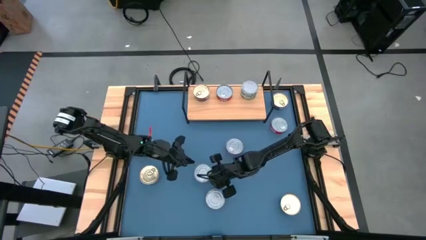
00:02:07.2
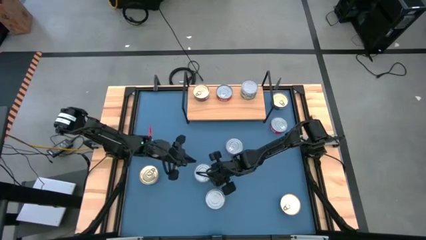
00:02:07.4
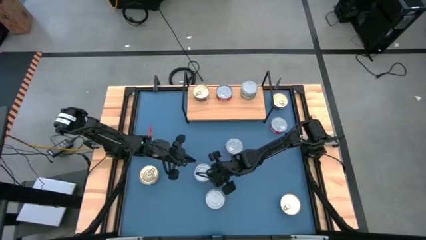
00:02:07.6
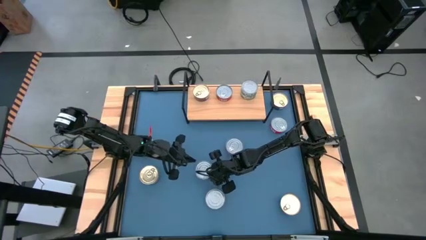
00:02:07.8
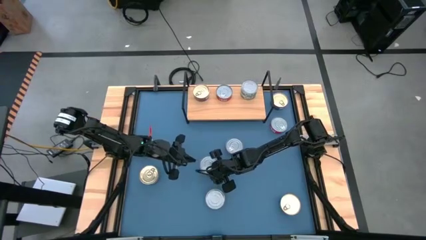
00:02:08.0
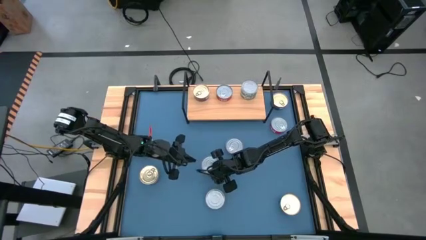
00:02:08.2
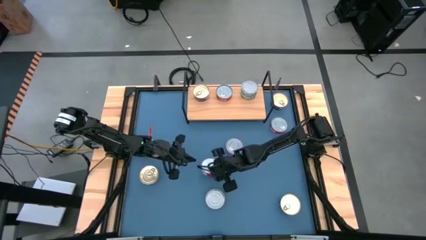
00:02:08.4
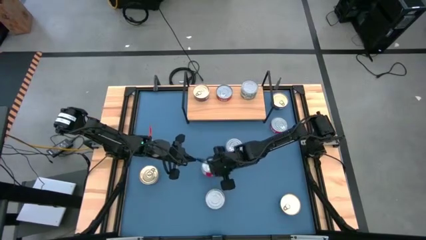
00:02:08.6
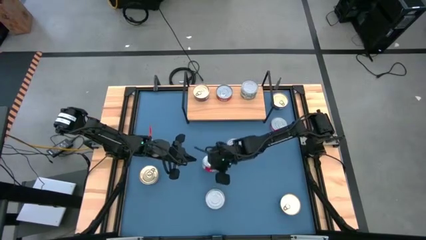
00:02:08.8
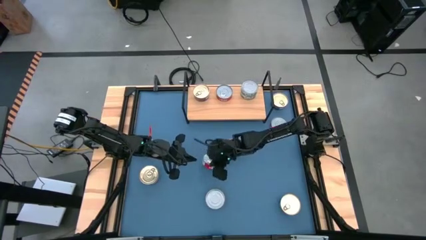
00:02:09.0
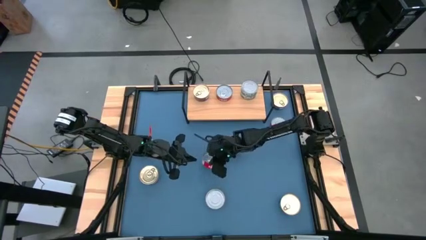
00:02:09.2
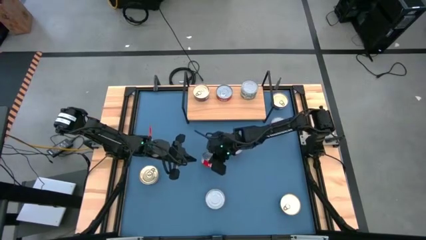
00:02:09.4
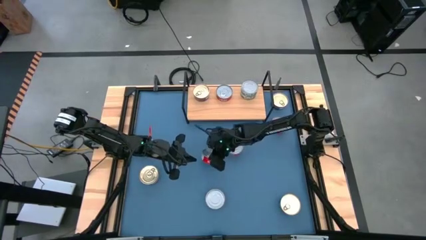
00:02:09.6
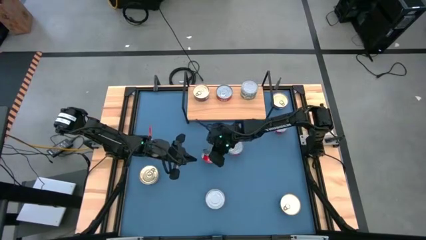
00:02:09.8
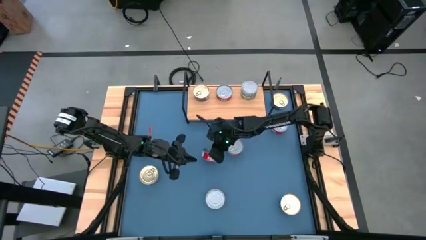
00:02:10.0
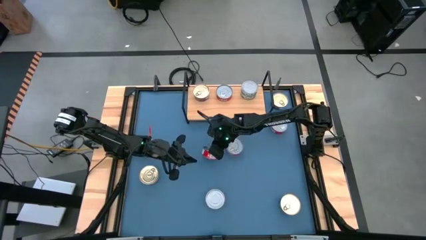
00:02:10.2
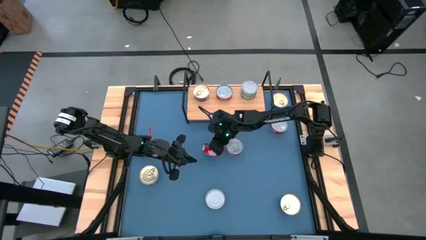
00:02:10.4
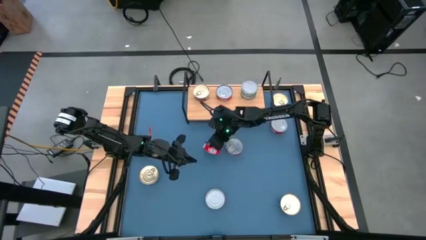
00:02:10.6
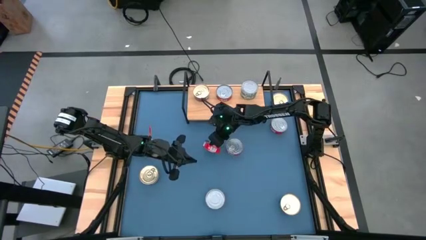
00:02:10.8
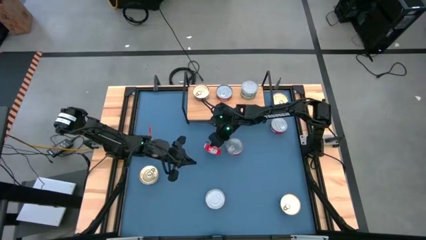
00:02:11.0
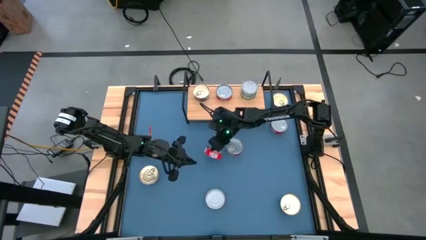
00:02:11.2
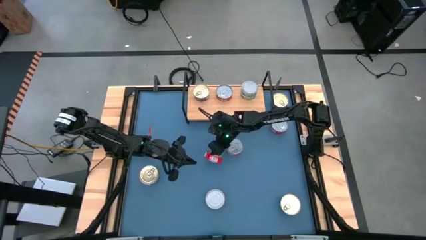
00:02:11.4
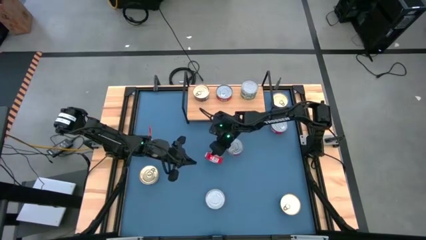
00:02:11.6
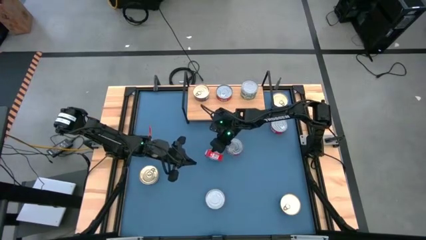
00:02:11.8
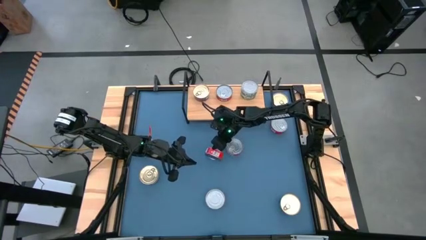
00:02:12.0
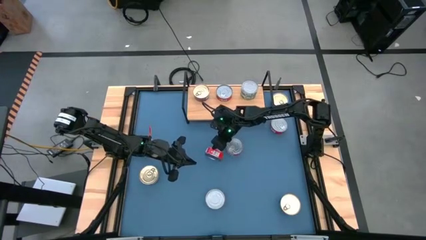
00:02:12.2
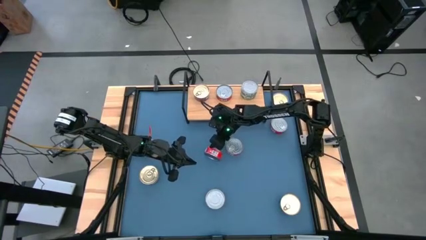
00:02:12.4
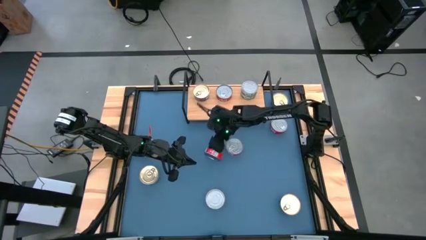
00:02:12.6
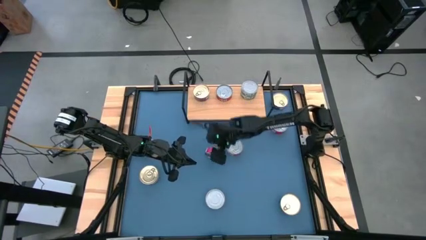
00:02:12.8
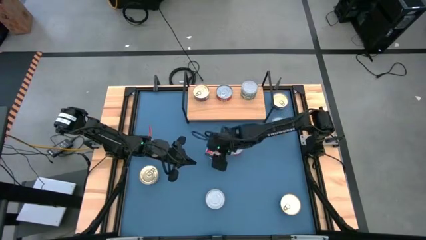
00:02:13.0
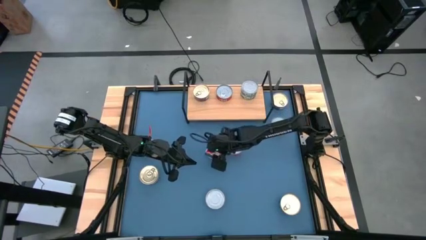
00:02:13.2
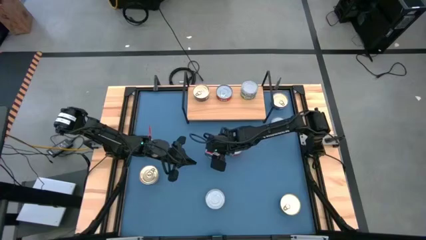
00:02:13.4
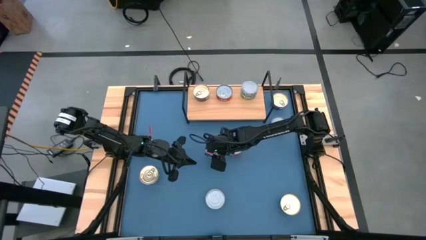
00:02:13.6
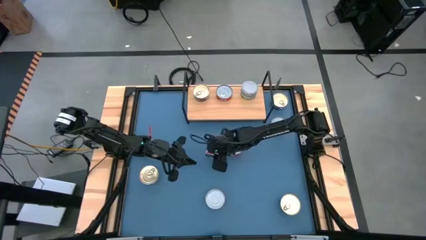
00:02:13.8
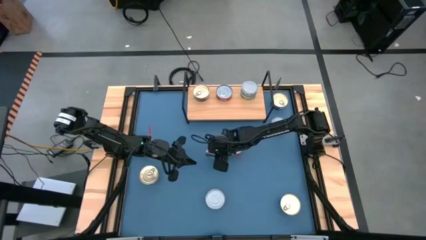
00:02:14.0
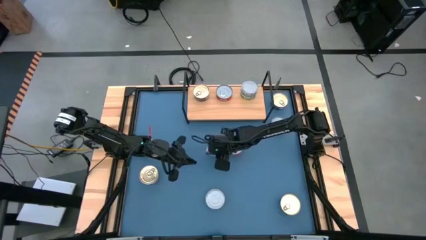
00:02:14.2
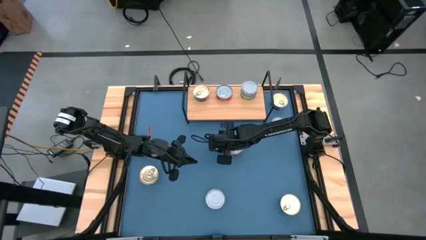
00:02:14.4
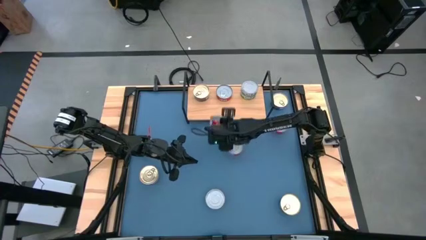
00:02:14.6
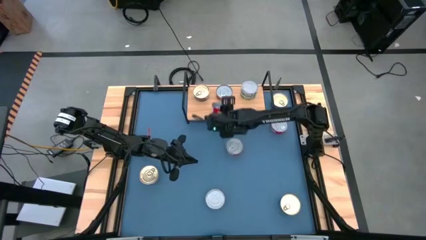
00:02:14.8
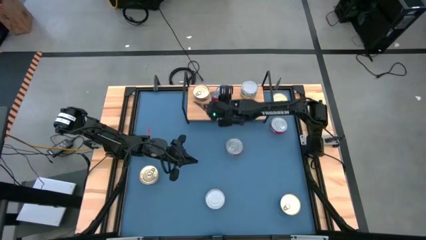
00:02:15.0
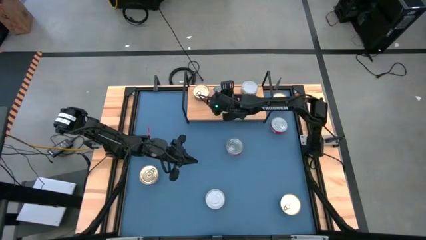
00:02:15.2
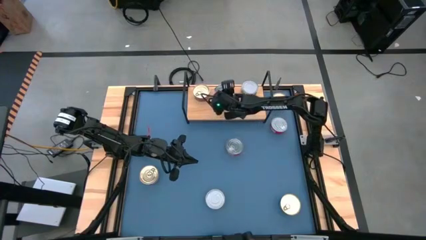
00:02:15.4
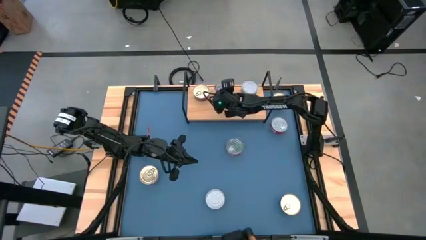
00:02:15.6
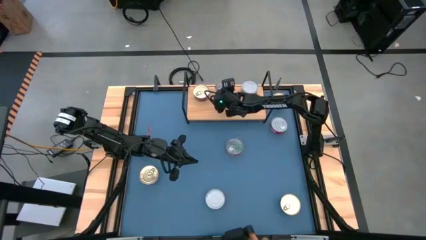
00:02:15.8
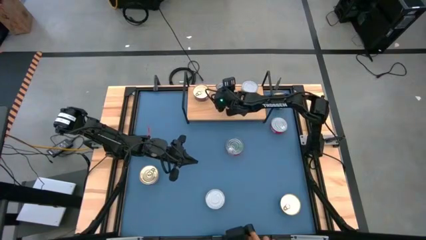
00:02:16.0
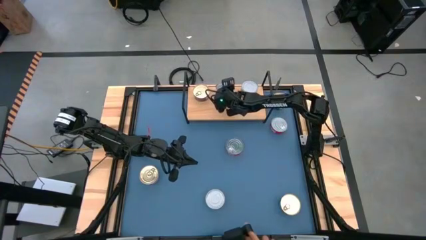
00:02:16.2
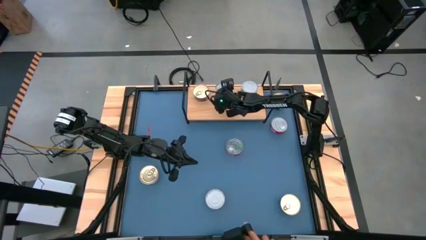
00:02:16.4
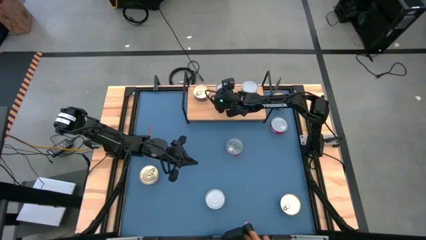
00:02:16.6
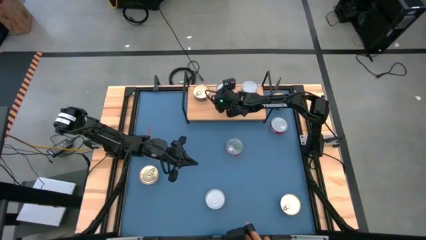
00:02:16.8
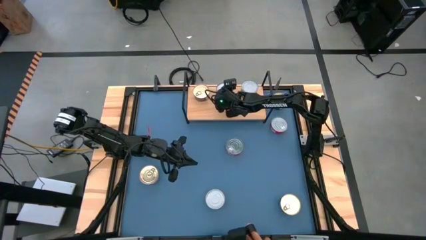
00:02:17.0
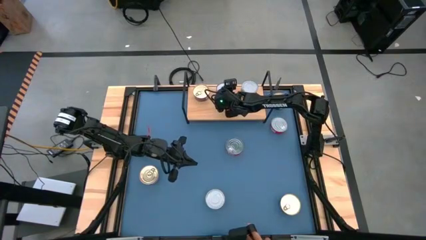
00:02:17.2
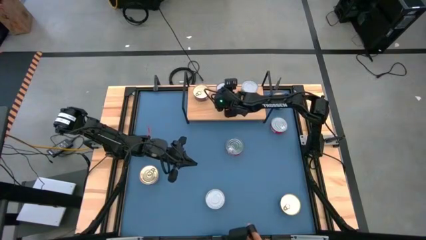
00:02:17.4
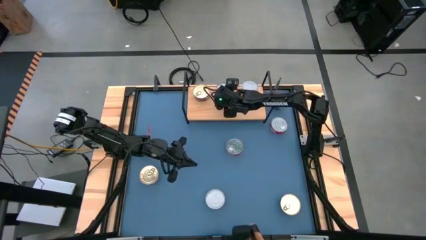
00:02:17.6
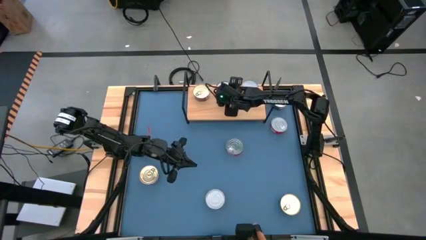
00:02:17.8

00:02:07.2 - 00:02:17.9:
Task: Stack canned seafood by type on shelf
Stack the red tuna can on top of the other red tuna can on the shelf

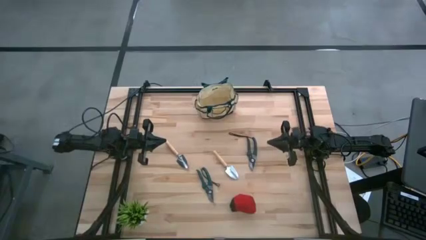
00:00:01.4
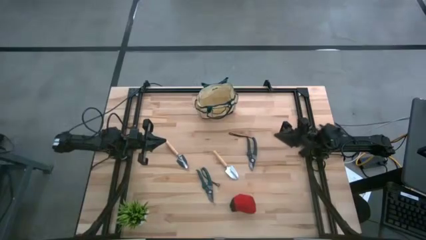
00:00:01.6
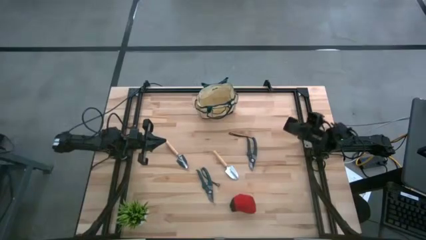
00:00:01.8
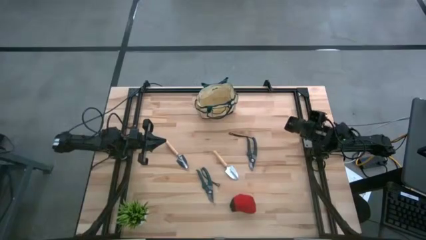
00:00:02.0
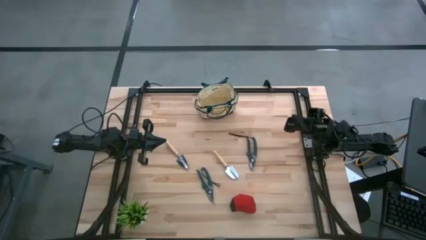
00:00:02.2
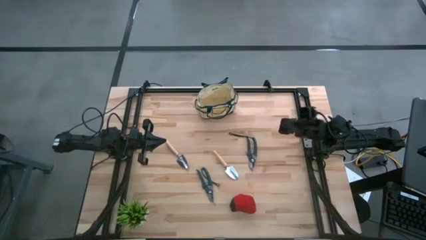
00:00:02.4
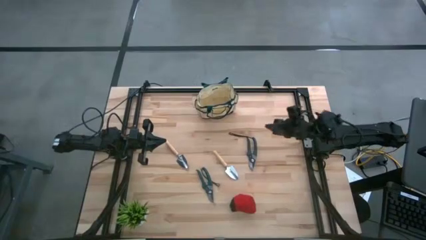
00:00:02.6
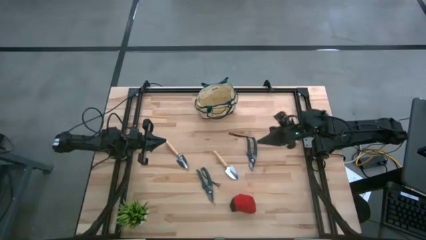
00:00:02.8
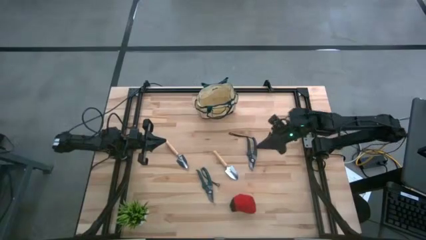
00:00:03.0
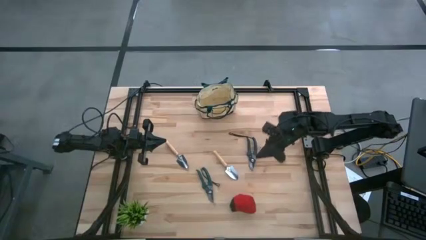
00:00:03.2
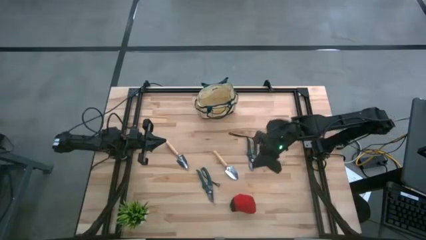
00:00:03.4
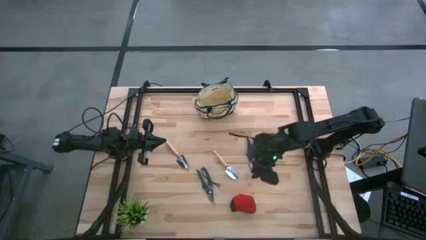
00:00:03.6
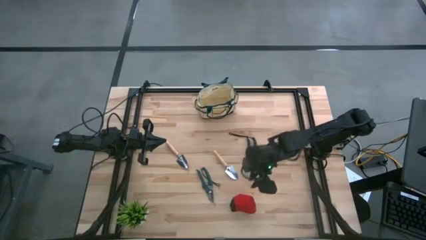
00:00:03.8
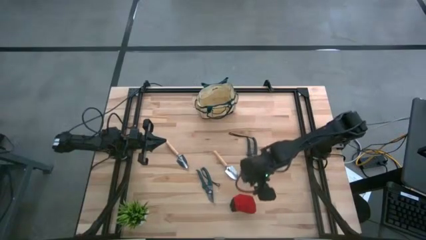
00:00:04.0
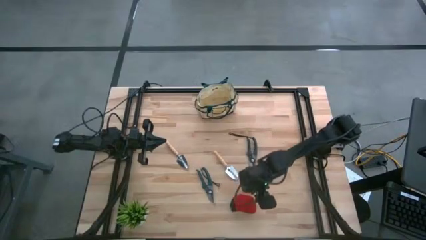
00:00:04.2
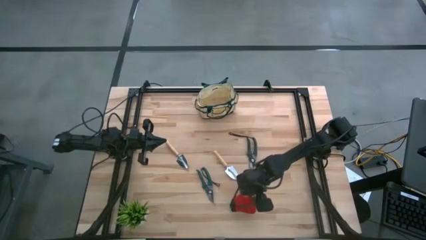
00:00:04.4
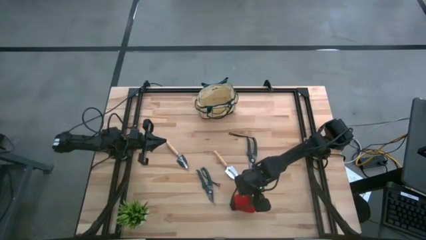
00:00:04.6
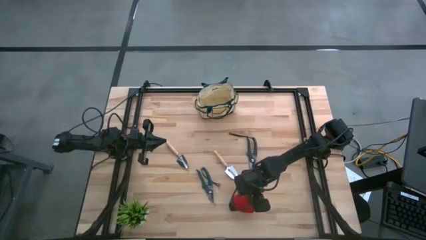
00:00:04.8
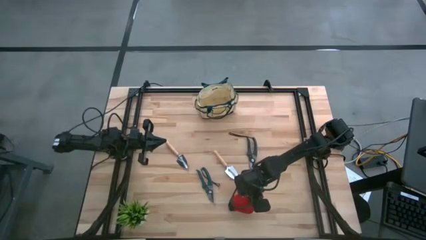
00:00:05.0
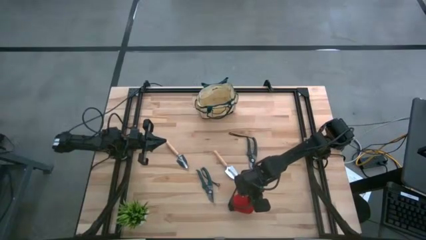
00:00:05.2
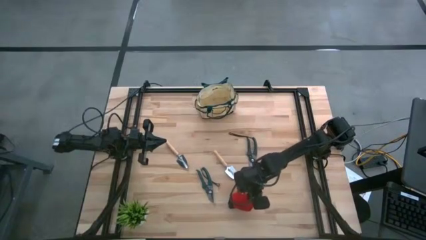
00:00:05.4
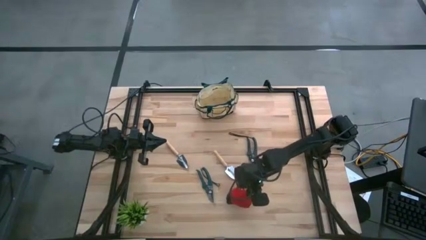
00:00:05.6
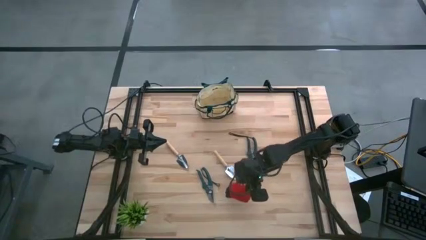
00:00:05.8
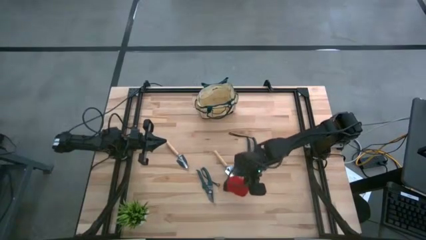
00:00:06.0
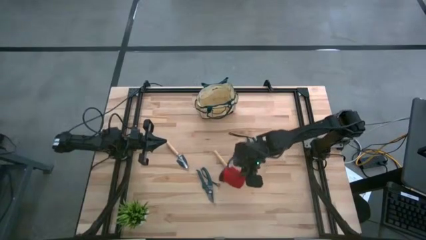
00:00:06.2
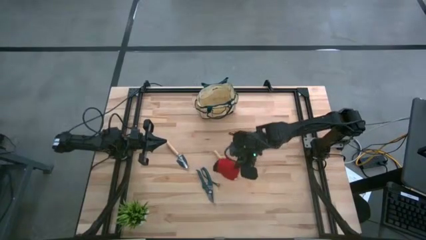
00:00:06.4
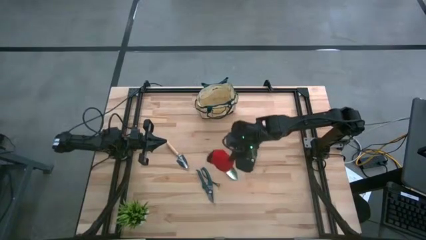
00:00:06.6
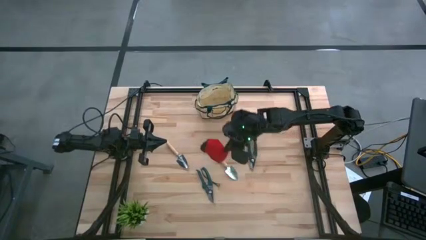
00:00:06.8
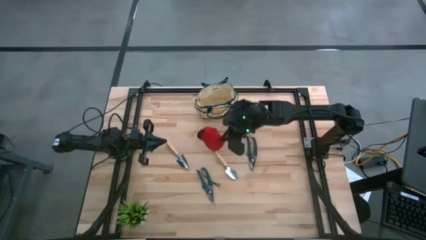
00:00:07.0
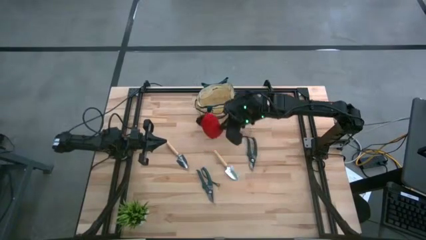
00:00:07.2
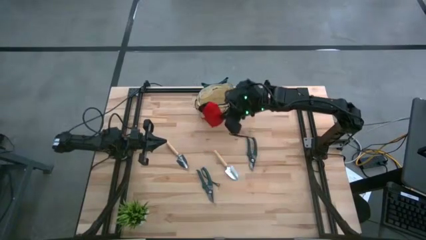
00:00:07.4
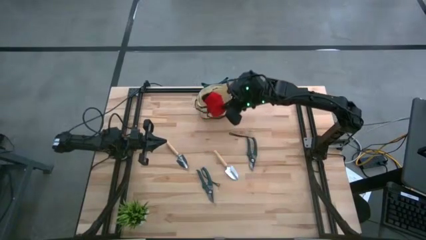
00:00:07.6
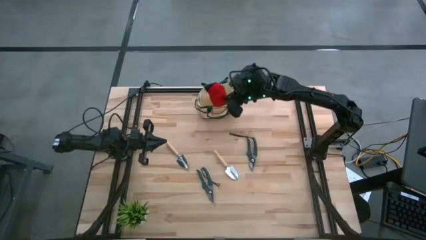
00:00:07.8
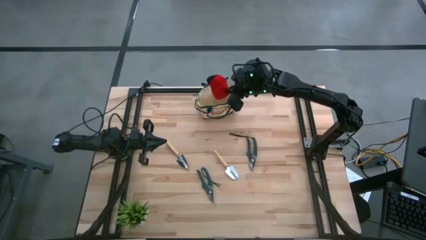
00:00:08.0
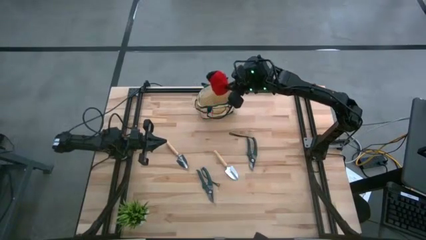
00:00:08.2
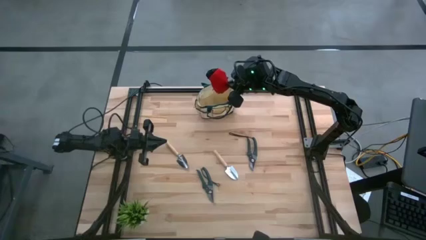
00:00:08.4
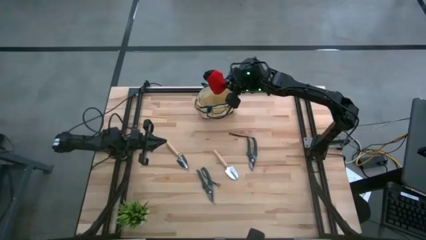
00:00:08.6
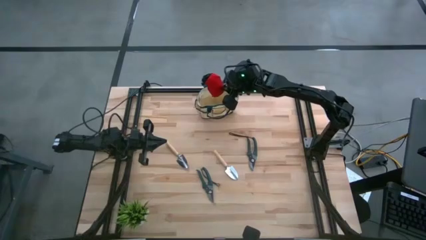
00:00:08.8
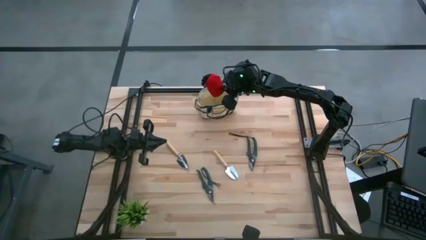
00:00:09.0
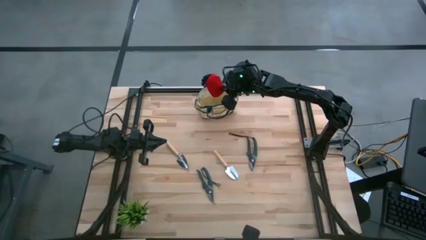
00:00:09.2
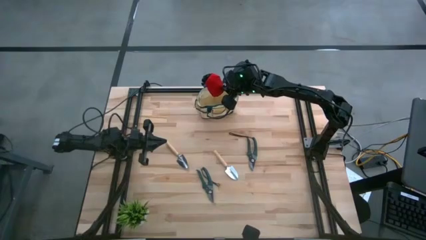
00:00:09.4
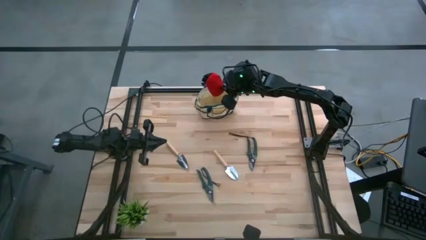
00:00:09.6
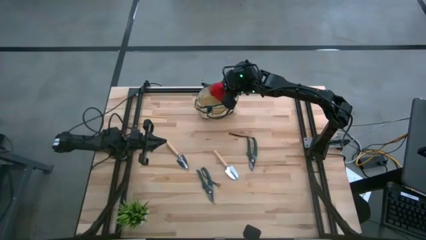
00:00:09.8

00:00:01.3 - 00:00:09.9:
Task: Pick & Place Garden tools in Gardening bag
Put the gloves into the gardening bag
